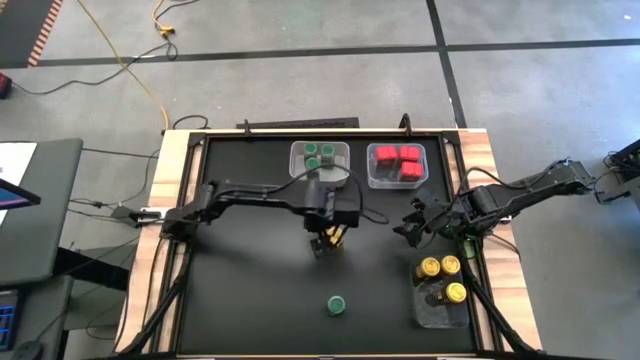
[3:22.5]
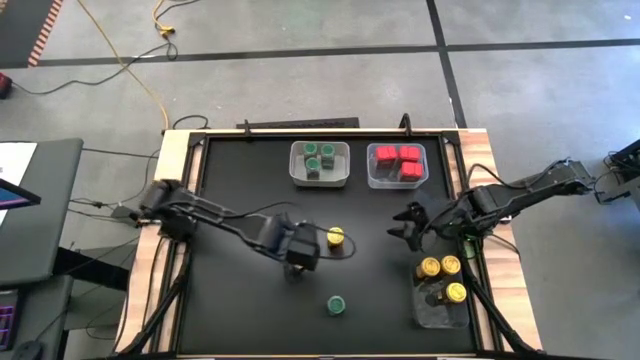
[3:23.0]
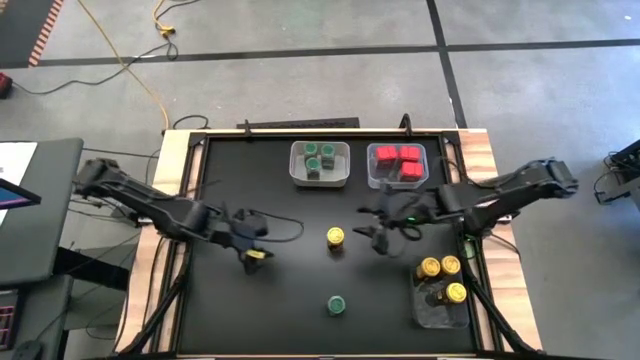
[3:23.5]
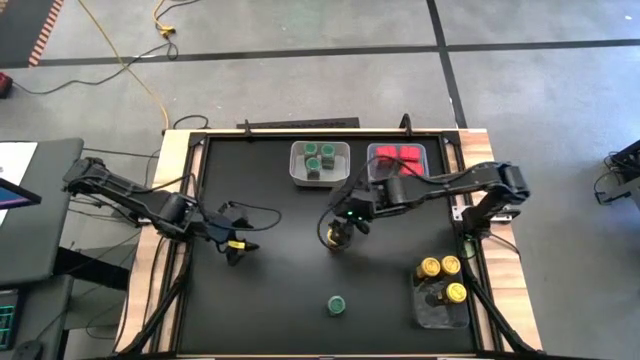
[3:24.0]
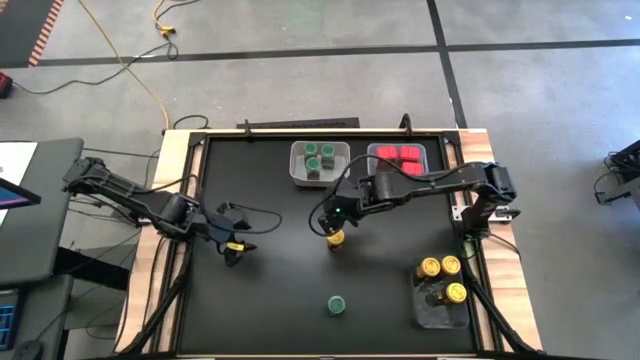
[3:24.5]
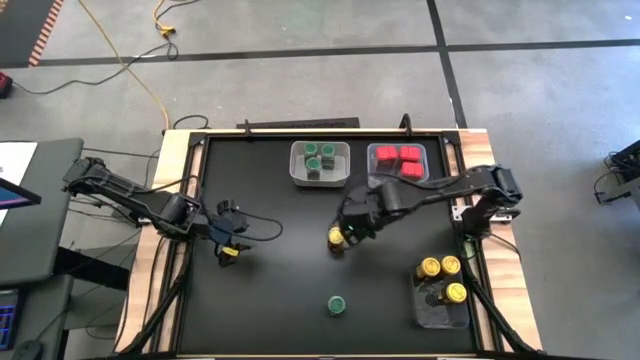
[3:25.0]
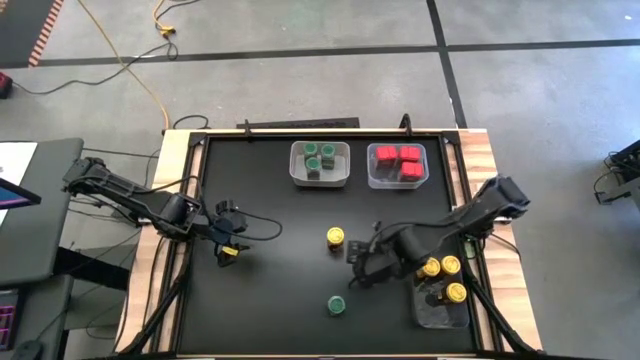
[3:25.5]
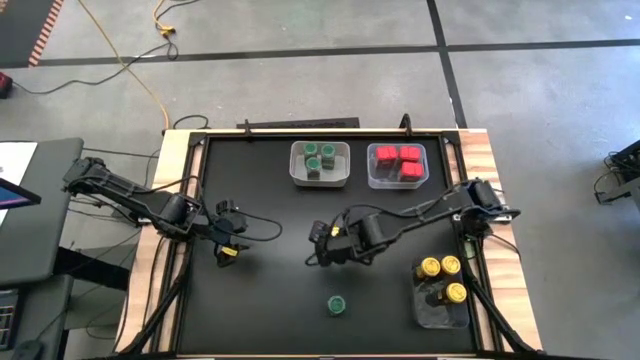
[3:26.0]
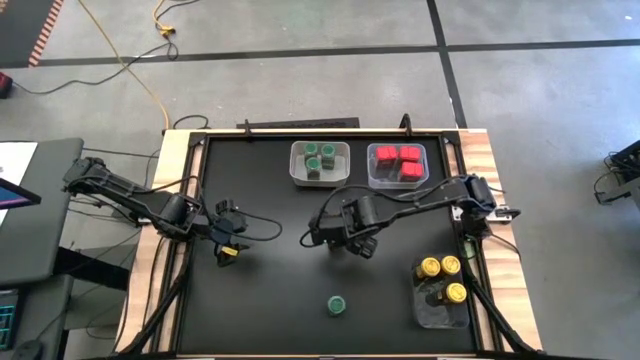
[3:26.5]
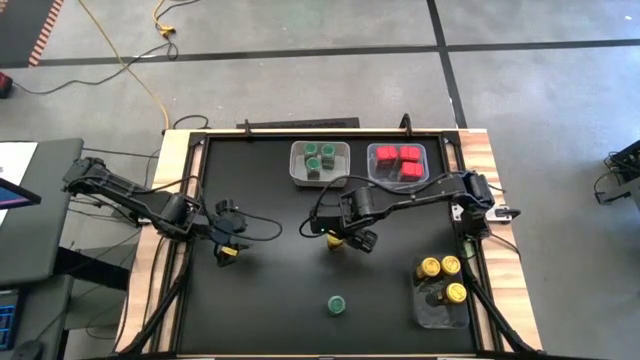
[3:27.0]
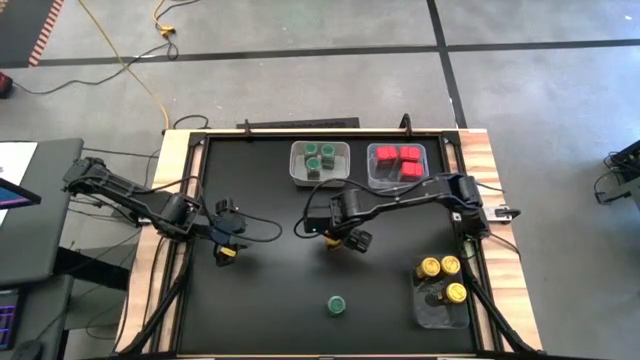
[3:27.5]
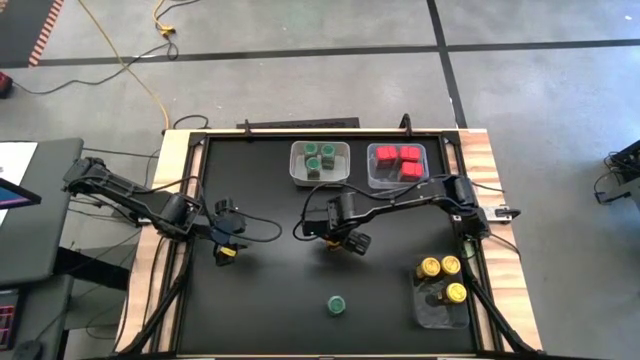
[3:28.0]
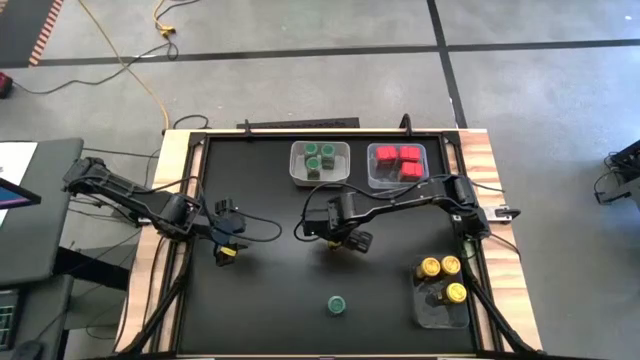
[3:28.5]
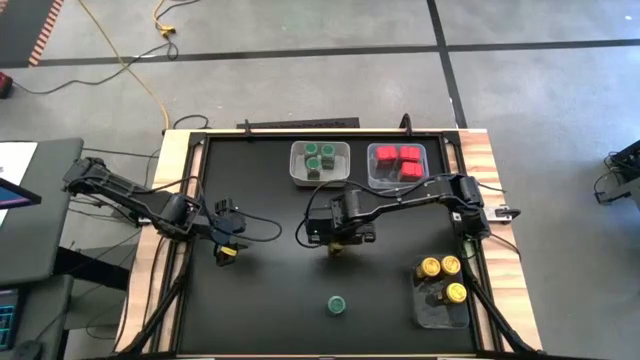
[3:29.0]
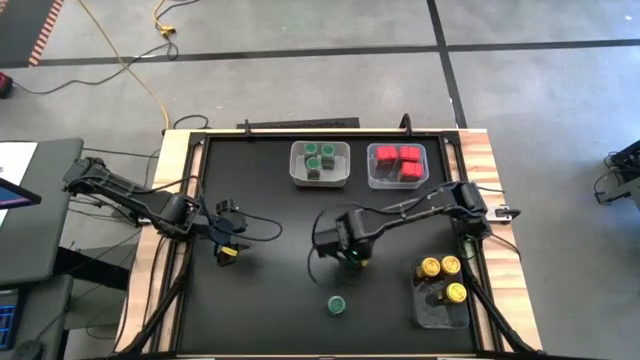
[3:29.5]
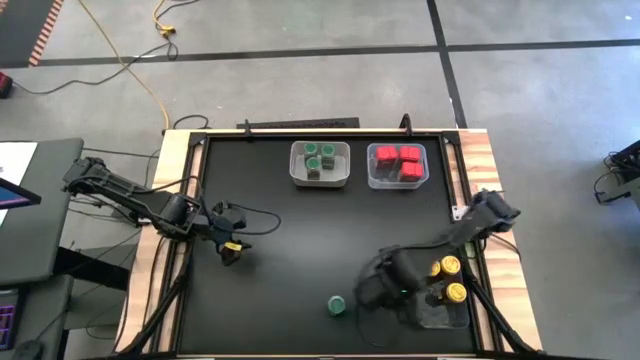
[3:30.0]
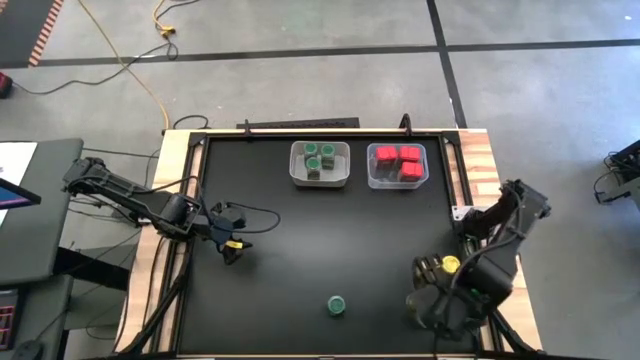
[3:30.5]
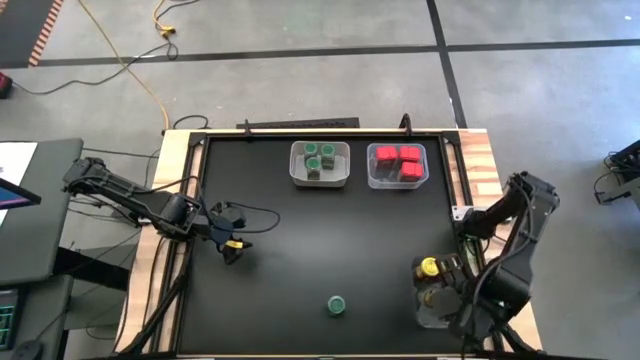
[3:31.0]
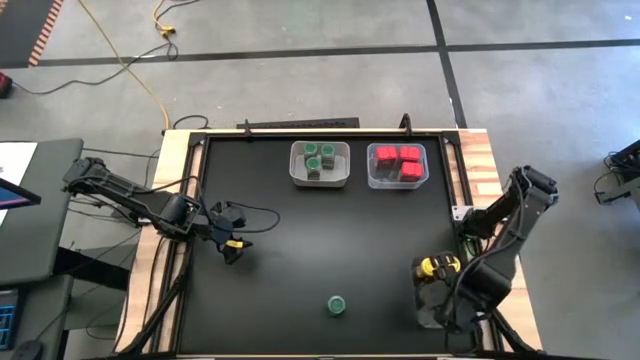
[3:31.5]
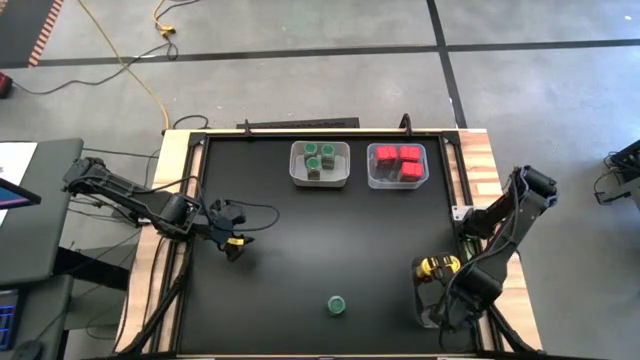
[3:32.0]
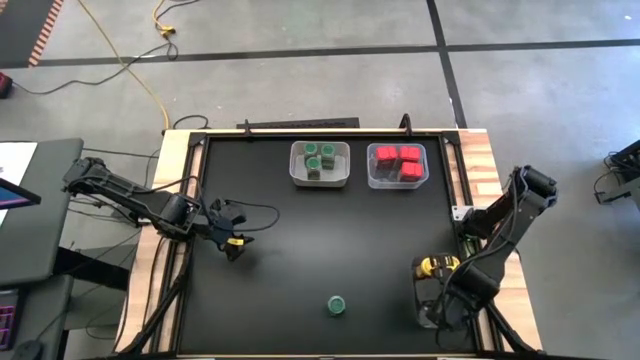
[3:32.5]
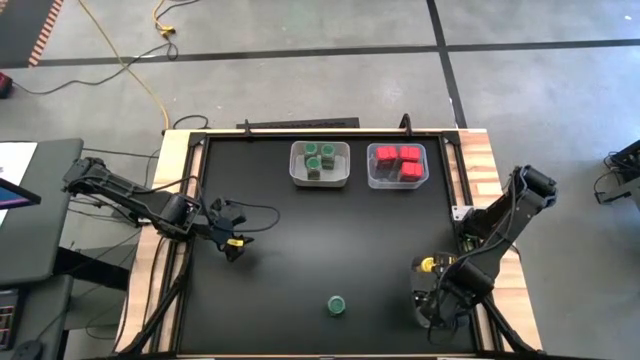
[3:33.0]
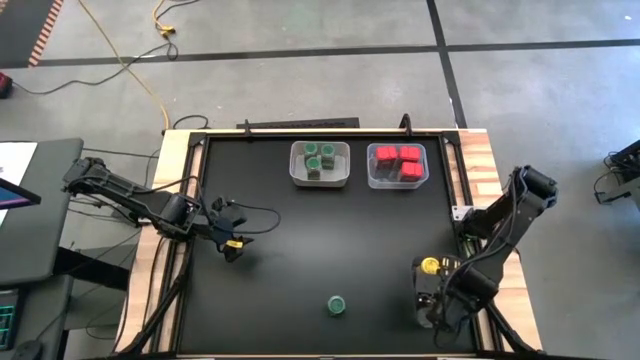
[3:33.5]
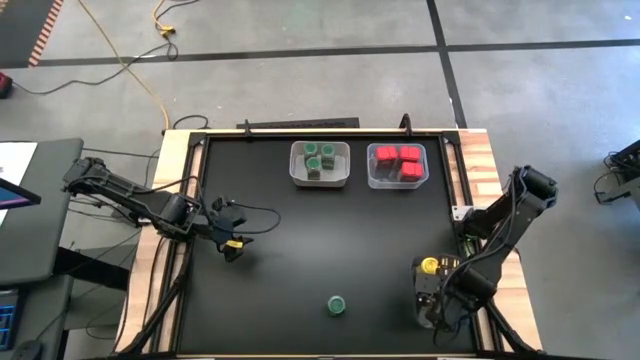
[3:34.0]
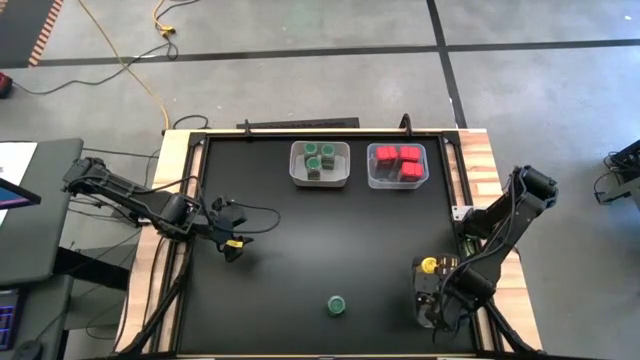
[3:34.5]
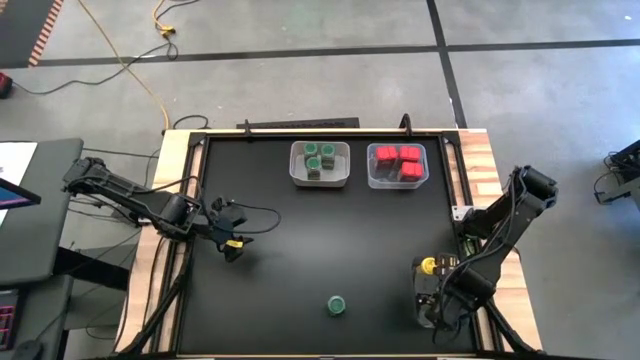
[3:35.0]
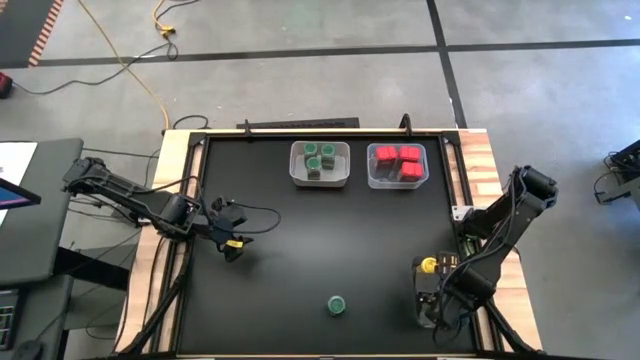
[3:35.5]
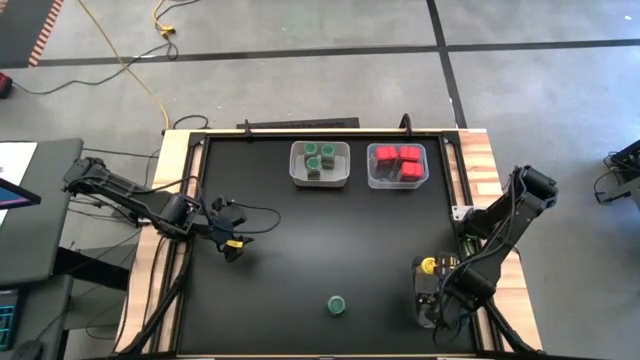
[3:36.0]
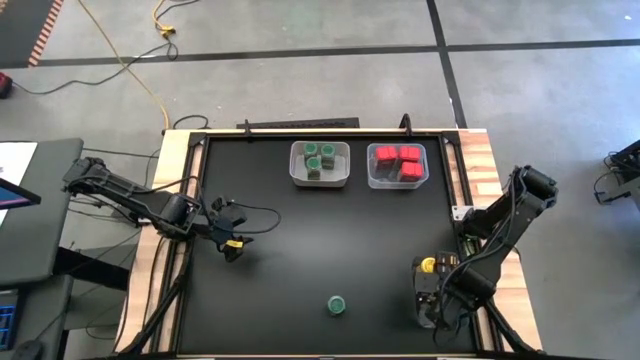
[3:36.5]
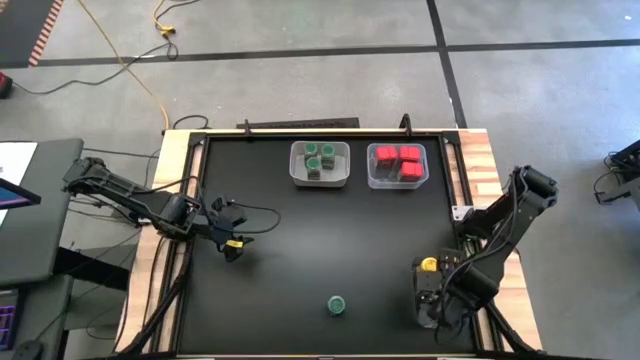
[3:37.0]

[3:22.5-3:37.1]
Task: Sort spices by type
Put the yellow seasoning bottle into the black bin

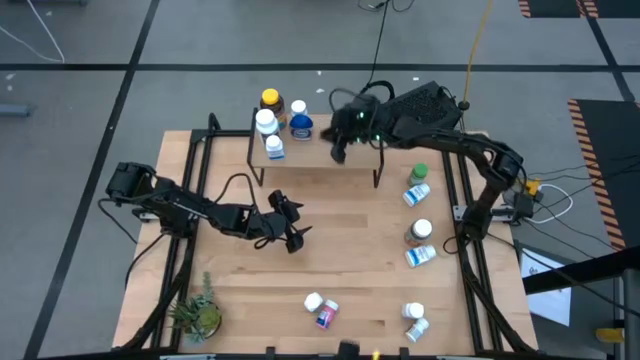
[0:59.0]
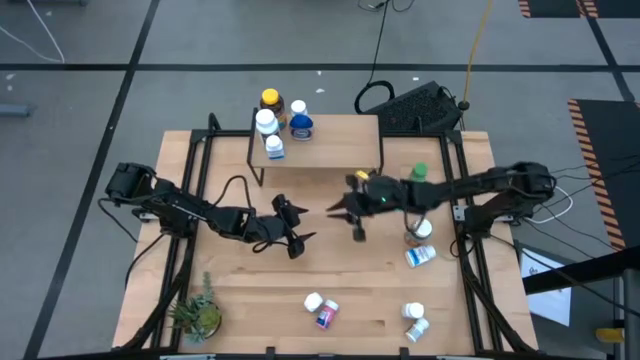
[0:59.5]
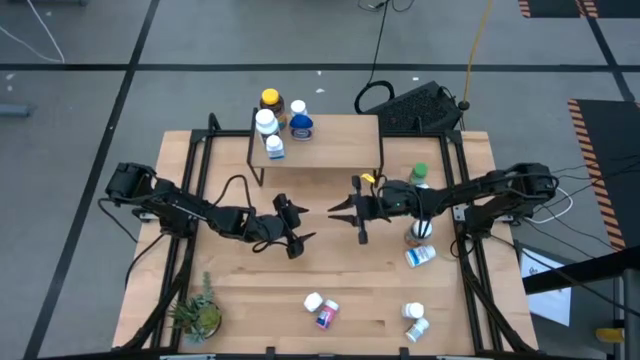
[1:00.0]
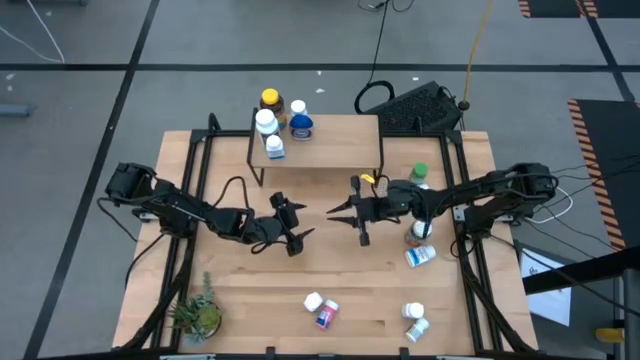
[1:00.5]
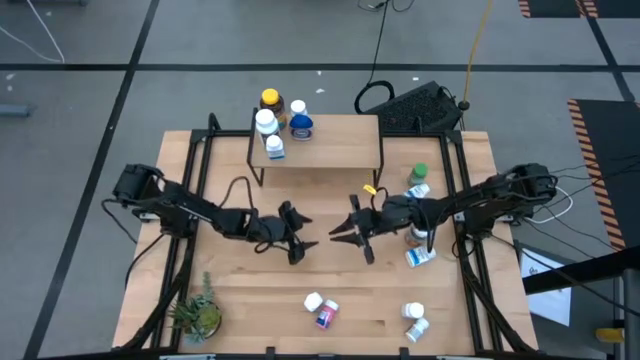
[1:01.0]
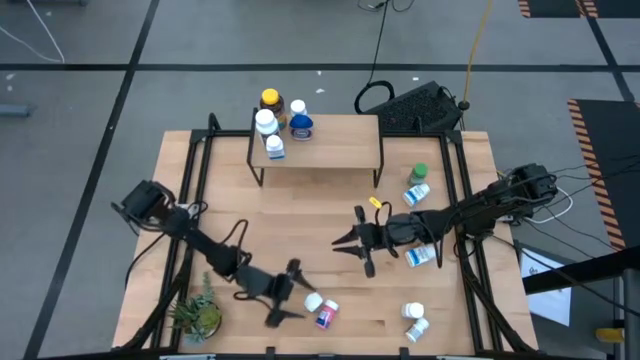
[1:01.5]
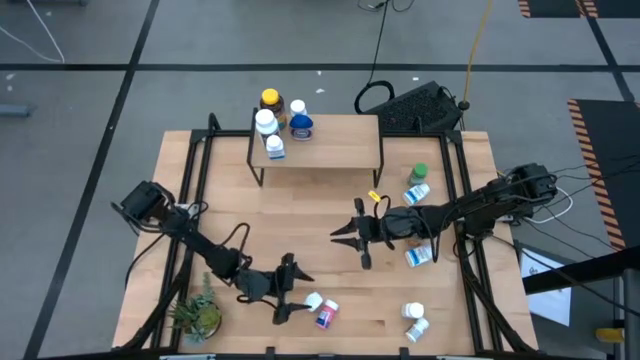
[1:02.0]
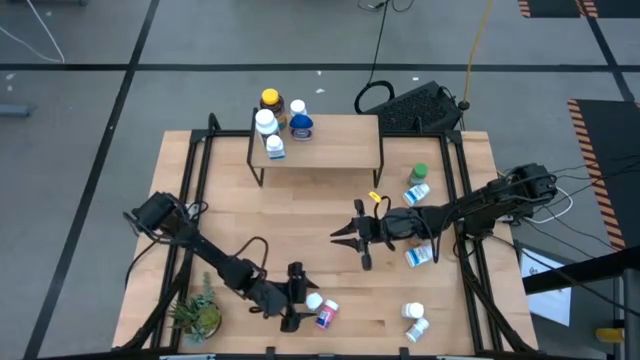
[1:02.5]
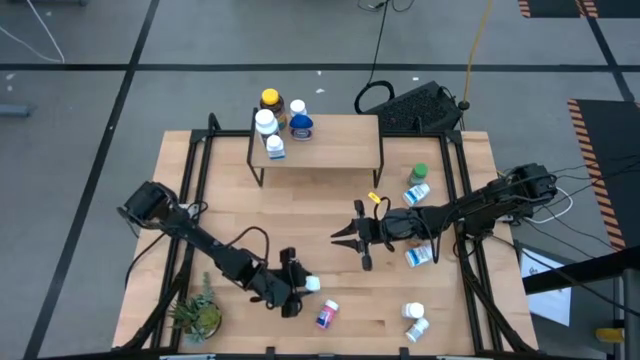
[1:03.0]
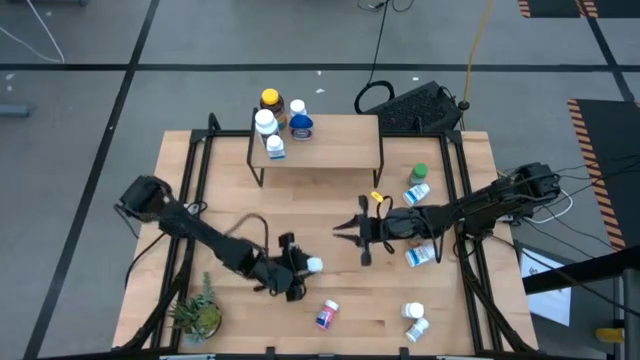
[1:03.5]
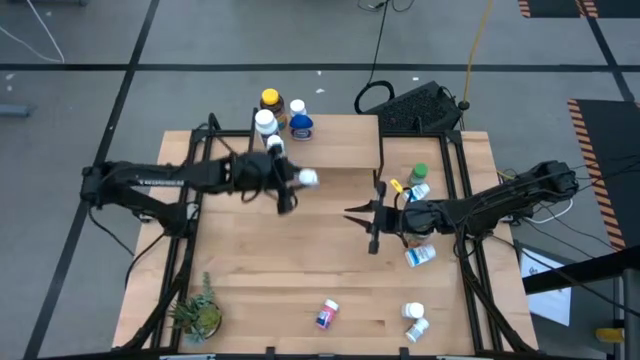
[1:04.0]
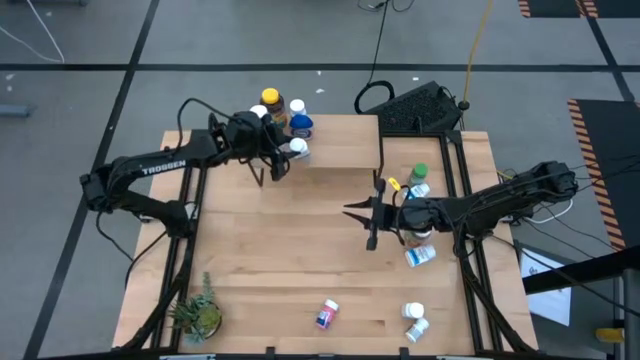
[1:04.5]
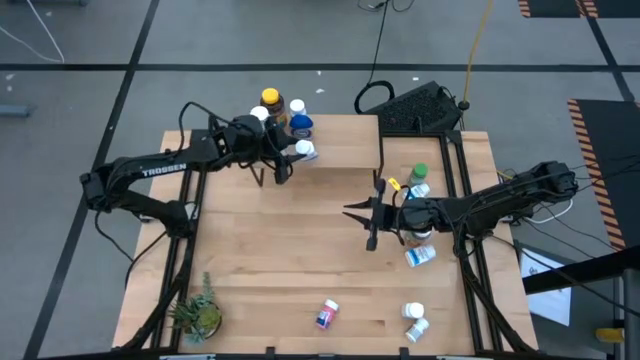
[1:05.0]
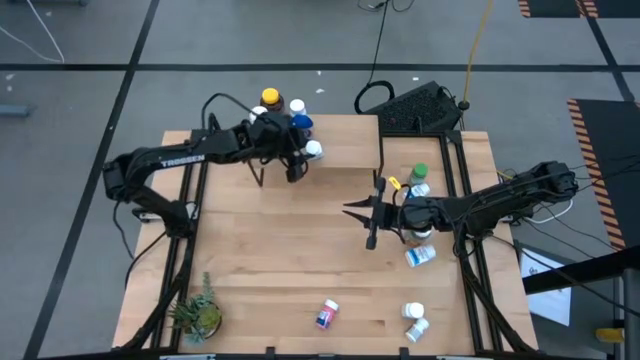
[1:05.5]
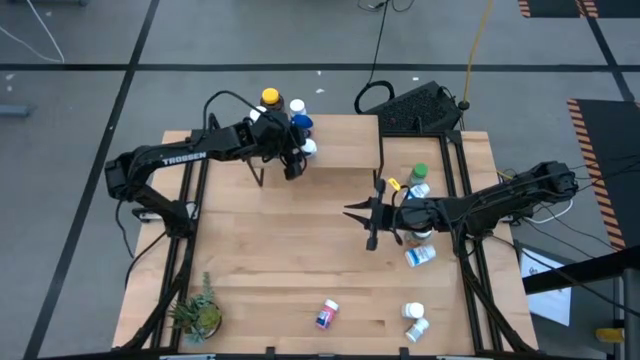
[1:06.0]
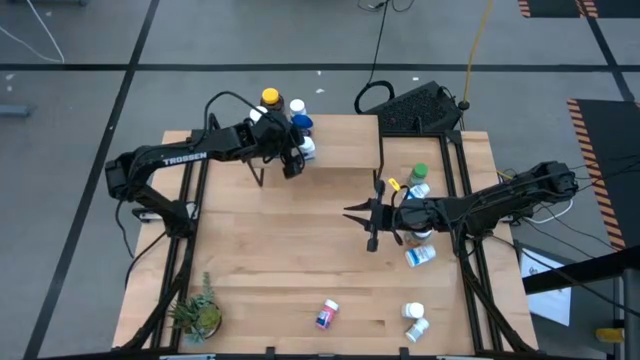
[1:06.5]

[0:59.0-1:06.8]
Task: Pick and place medicine bottles onto shelf by color
Put the white blue medicine bottle on the shelf
